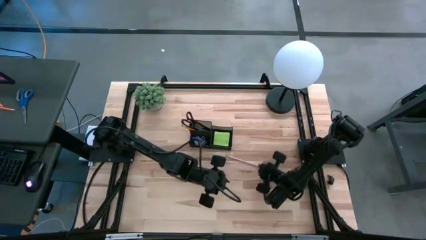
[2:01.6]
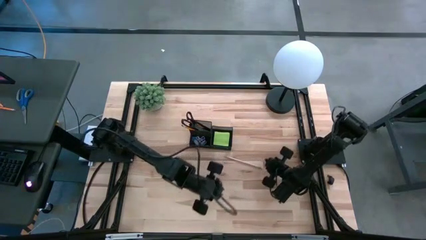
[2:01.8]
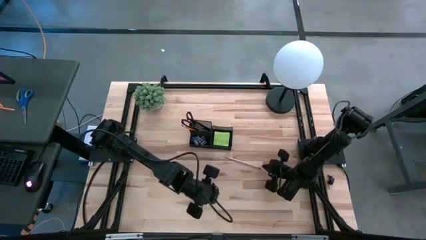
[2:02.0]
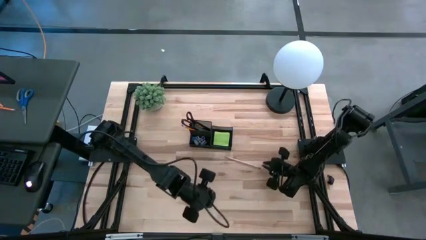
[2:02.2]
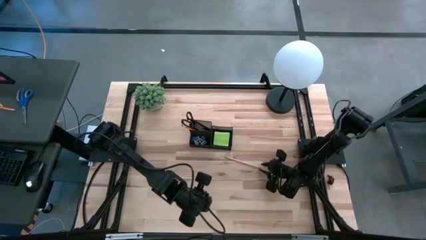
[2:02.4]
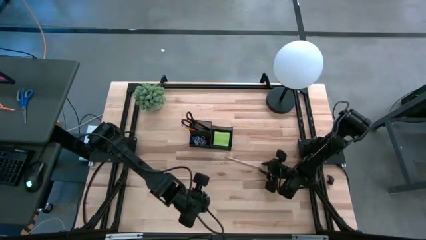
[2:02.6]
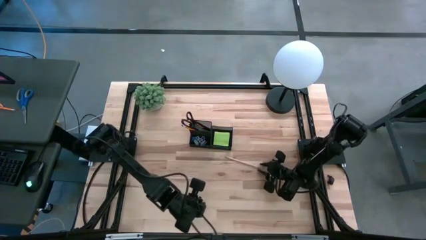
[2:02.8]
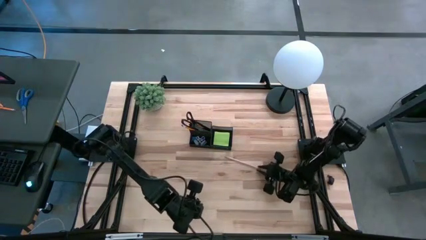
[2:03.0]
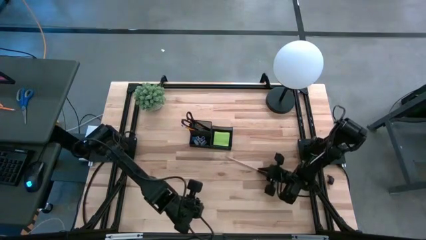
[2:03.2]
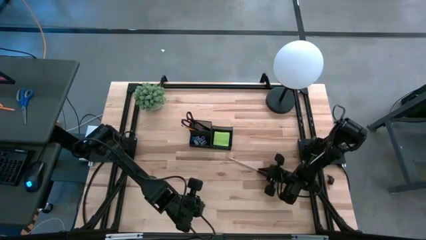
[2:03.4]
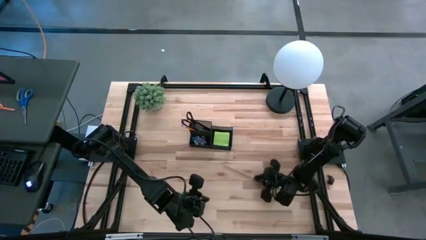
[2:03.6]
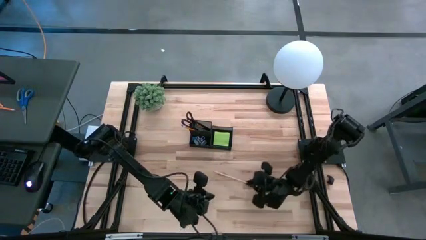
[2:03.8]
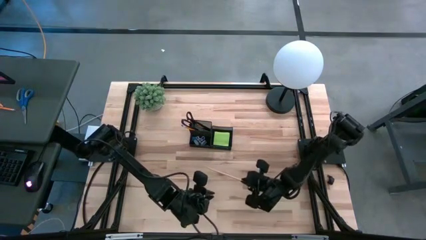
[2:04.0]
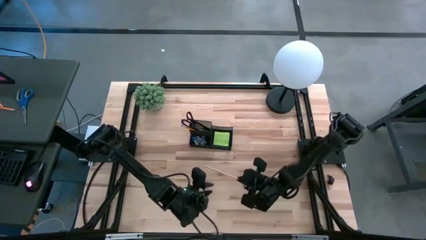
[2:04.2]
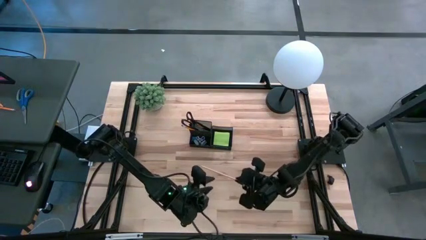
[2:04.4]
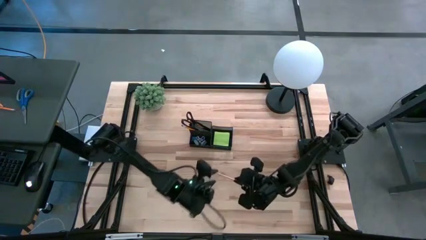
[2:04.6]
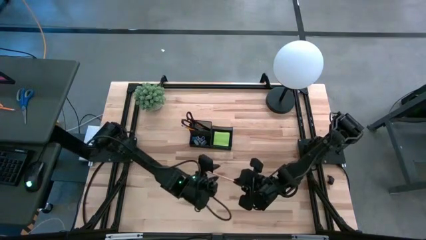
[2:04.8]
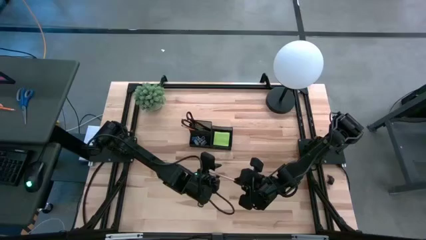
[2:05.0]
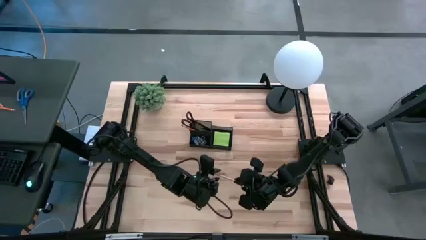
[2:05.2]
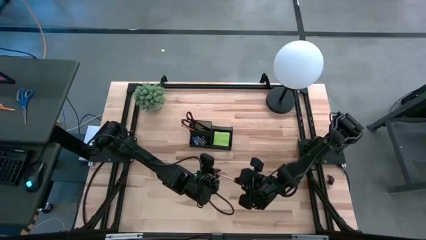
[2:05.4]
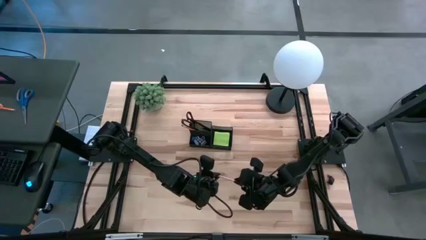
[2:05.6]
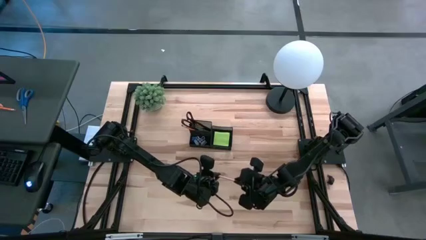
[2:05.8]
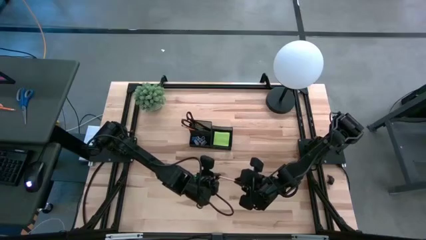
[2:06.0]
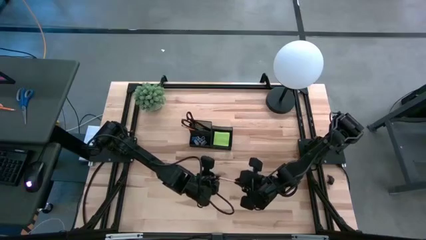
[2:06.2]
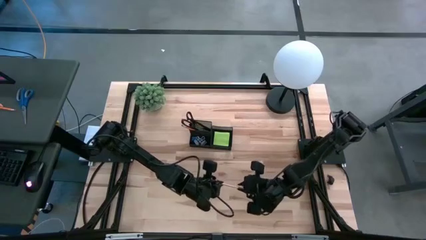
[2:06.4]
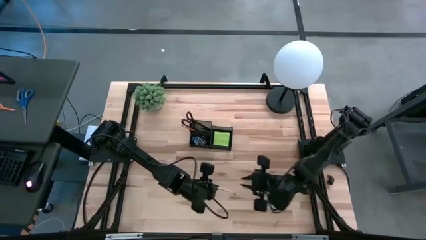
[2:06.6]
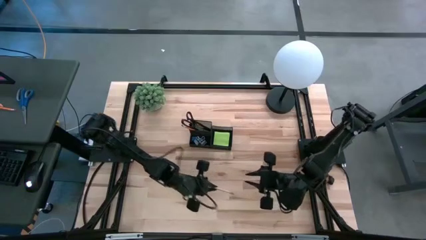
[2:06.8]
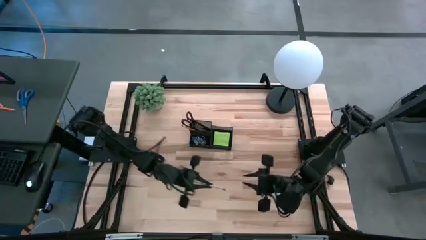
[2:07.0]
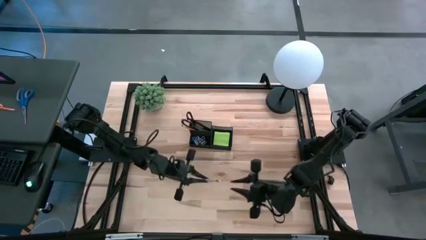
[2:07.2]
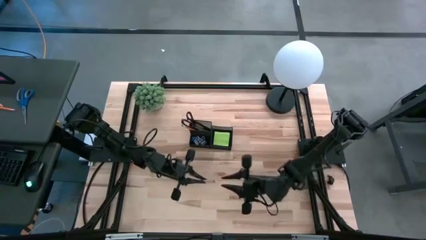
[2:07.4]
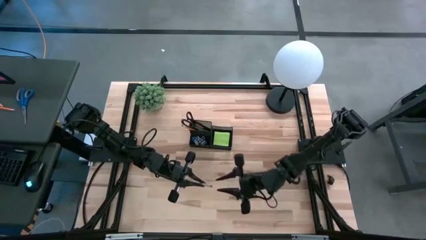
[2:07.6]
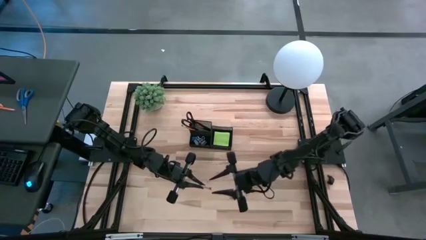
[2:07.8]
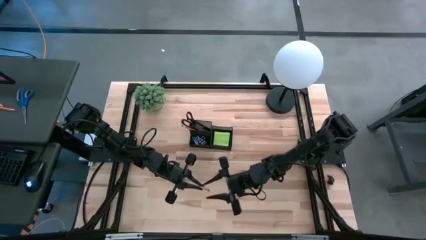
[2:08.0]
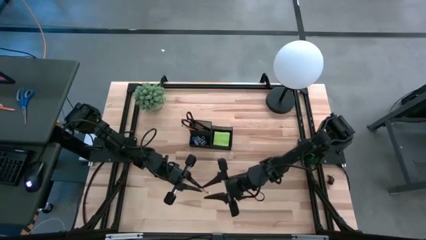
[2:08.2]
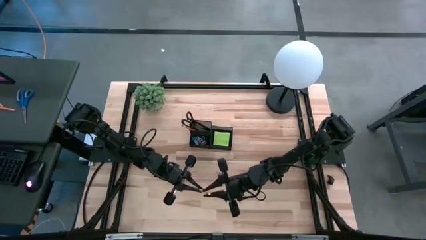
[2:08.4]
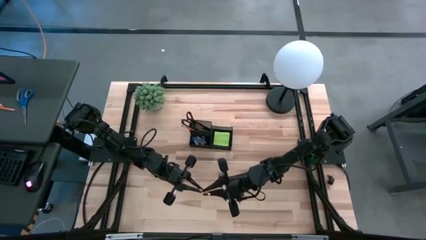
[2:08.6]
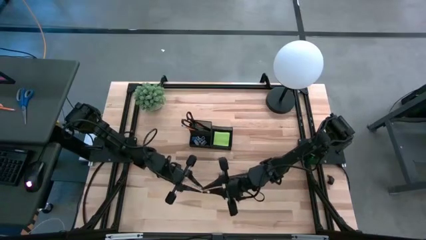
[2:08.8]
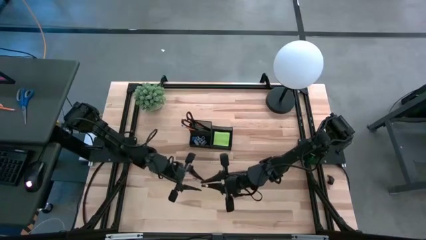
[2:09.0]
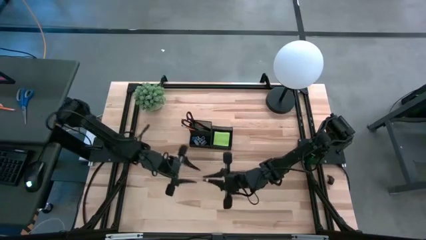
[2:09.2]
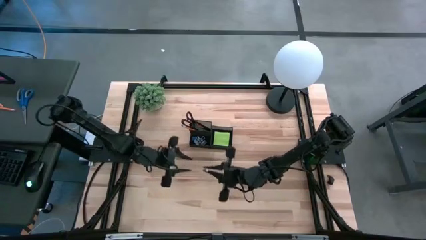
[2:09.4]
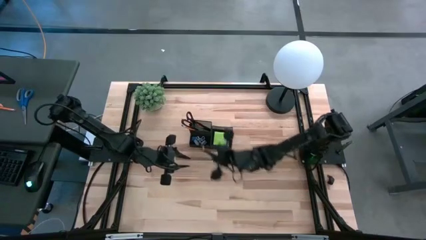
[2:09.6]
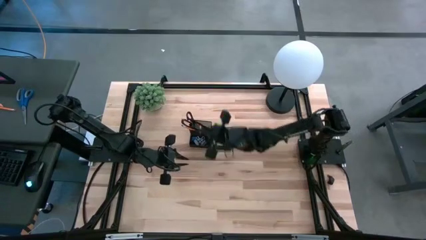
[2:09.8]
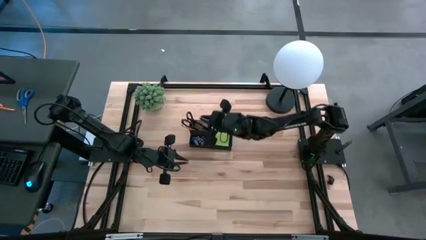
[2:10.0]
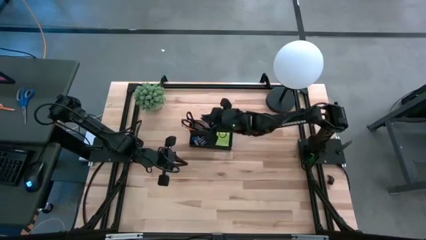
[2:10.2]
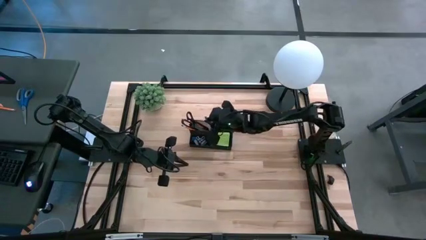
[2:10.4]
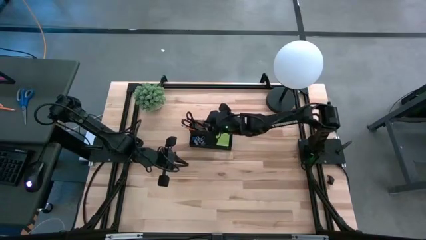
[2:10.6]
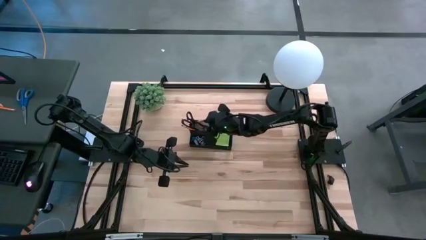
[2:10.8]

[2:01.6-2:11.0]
Task: Pick and place office supplies into organizer
Put the pink pencil into the organizer bin

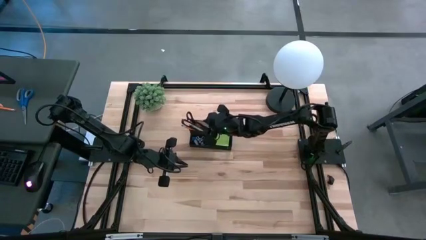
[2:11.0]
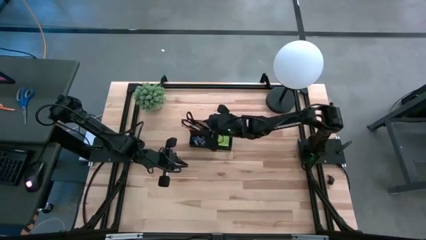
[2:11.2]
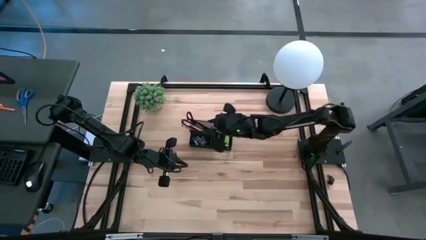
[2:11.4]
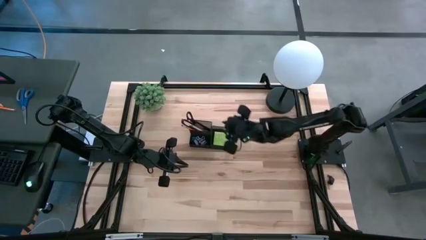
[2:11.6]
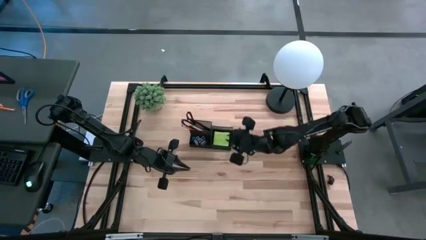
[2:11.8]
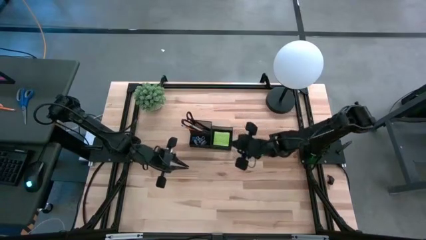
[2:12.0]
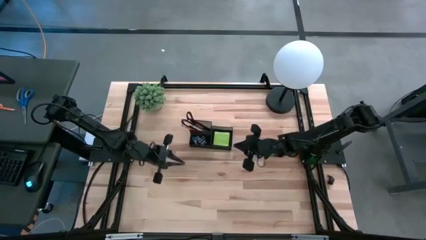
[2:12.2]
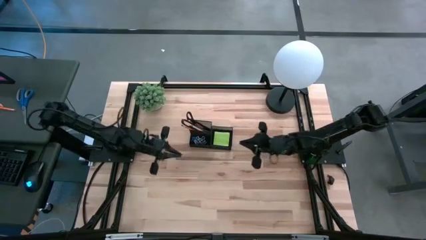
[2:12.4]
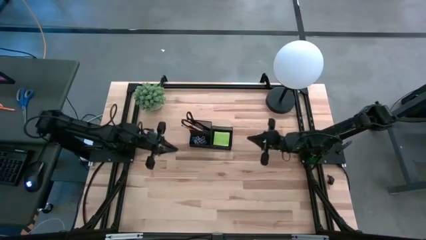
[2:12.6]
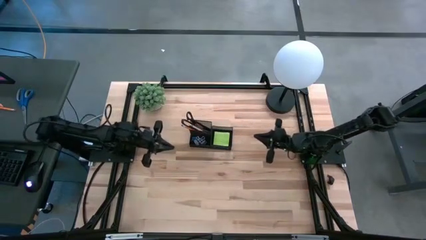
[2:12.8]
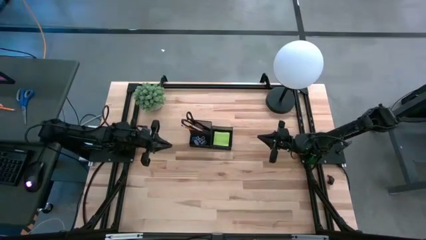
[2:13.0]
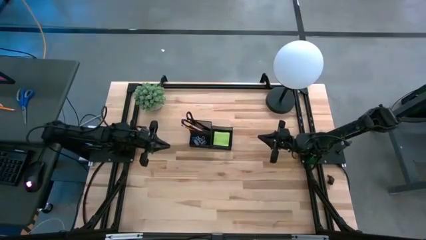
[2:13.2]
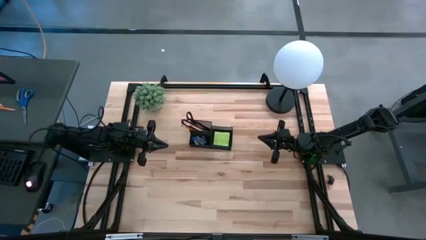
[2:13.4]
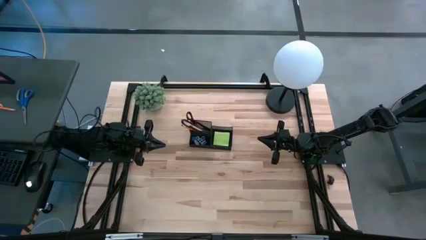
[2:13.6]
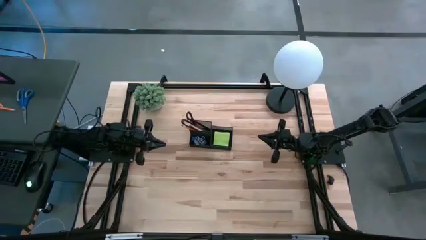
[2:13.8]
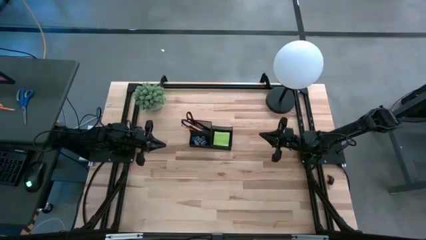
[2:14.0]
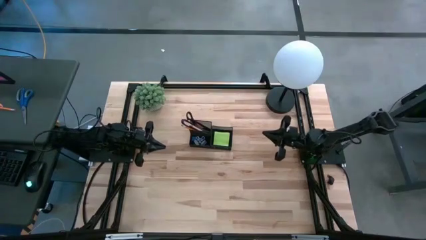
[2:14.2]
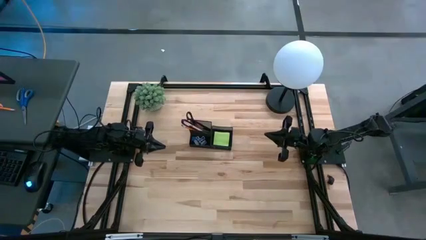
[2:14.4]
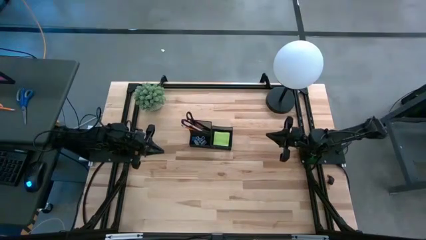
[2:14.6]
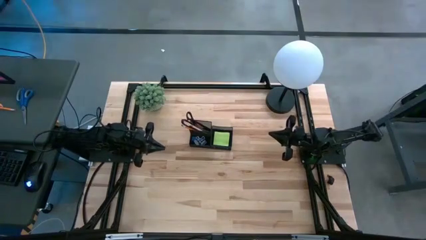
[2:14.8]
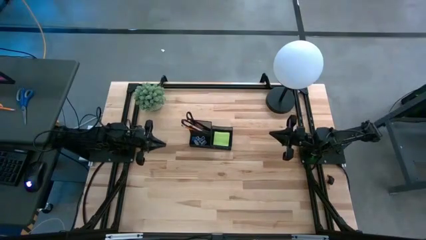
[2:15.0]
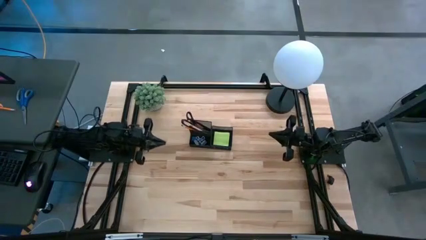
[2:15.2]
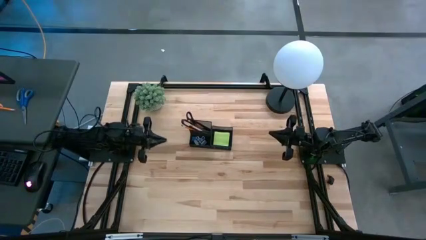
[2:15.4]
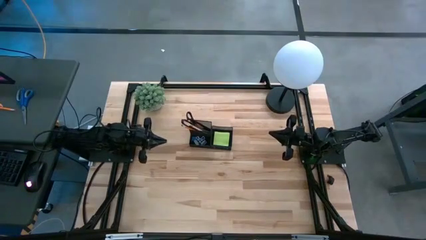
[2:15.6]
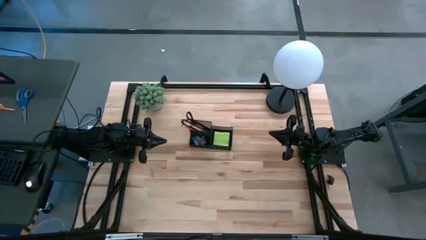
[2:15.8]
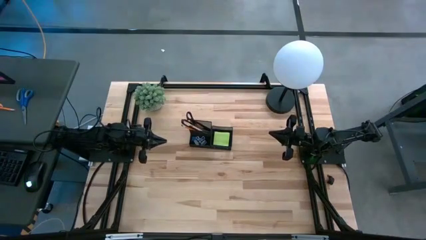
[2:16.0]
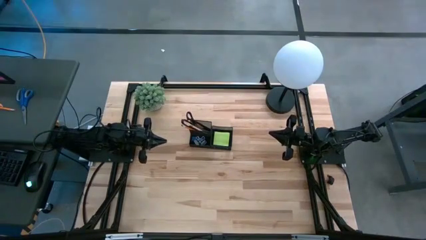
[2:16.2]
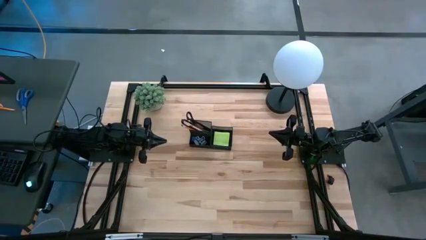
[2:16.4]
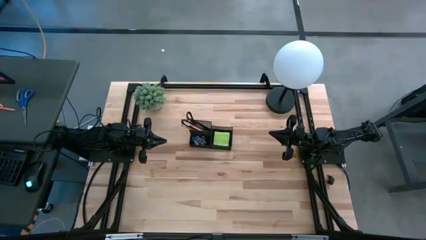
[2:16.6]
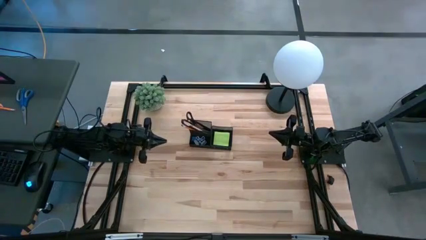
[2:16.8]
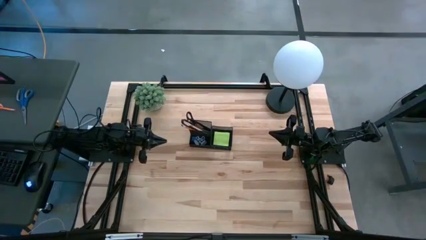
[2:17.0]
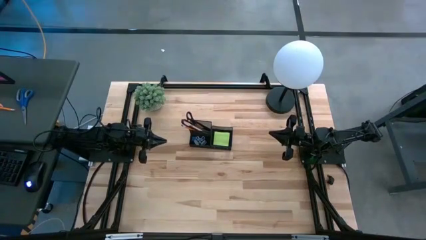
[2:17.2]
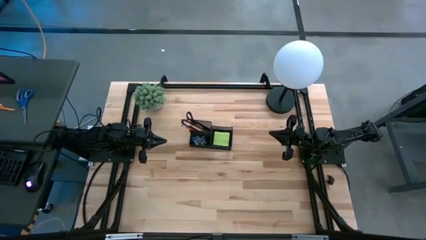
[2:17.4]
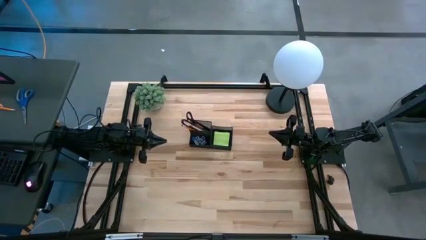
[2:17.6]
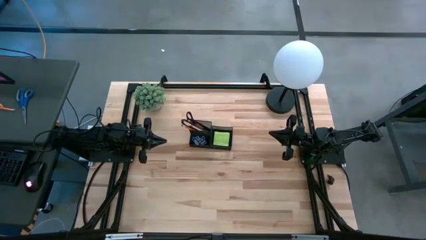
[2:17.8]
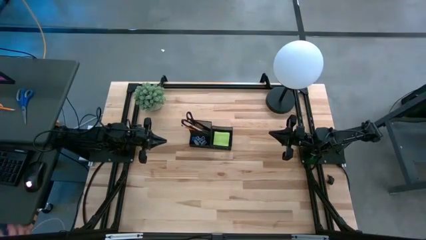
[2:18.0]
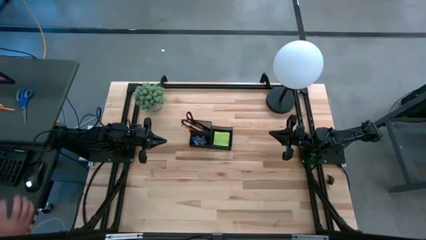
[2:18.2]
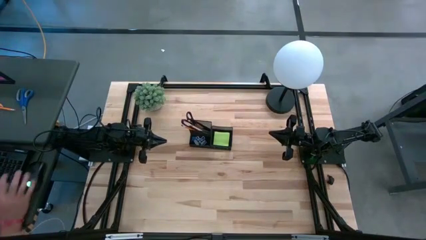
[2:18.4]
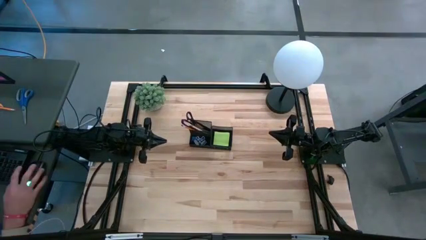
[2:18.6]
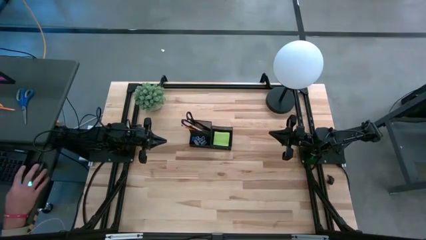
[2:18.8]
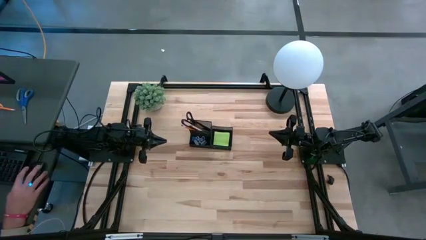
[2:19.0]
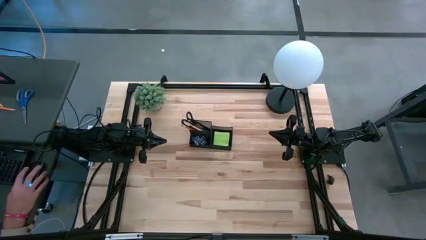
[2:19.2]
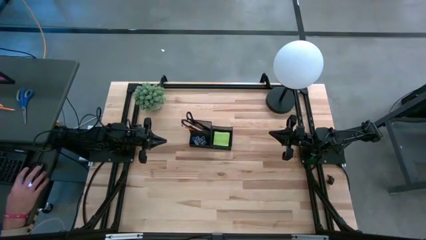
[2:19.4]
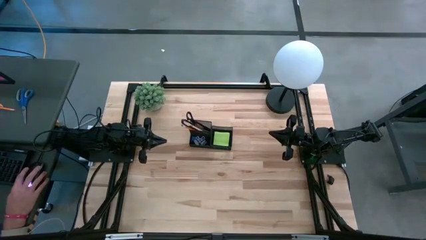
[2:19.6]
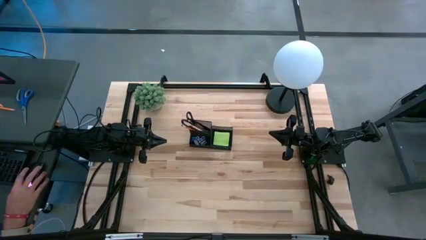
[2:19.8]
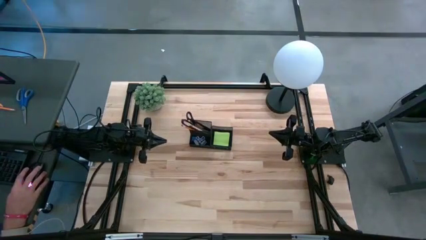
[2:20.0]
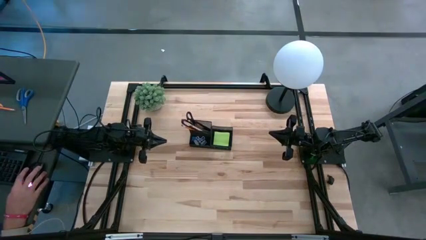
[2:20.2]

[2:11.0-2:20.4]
Return to Home Position
